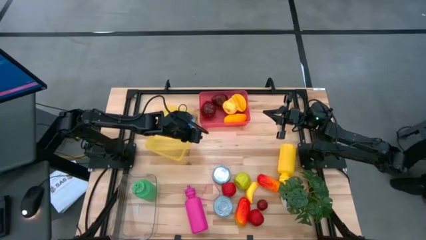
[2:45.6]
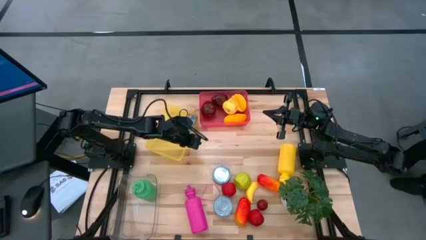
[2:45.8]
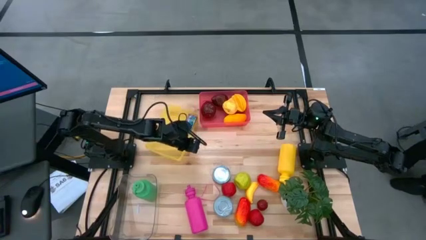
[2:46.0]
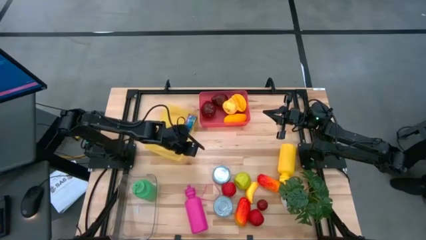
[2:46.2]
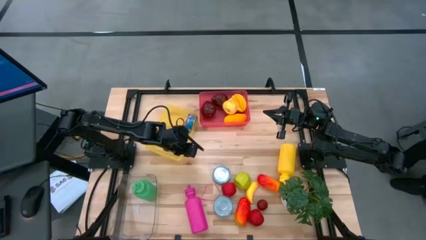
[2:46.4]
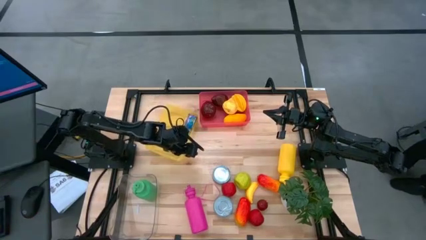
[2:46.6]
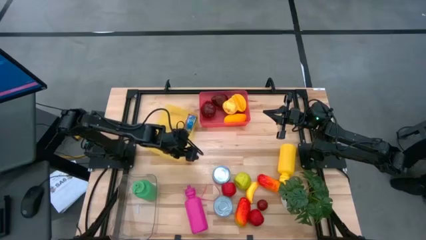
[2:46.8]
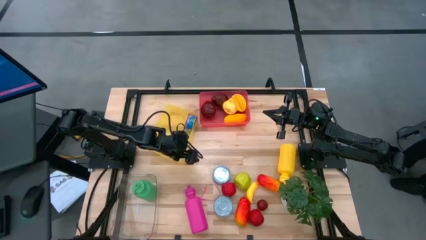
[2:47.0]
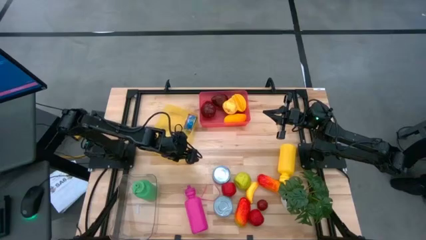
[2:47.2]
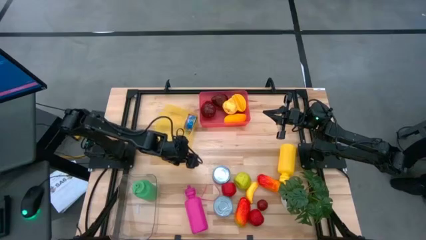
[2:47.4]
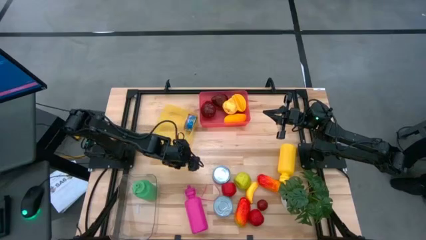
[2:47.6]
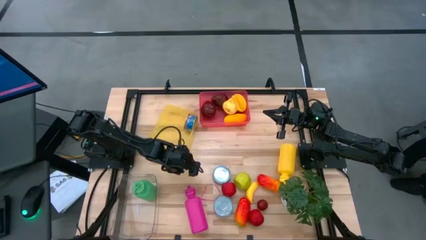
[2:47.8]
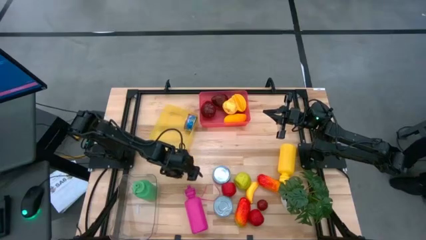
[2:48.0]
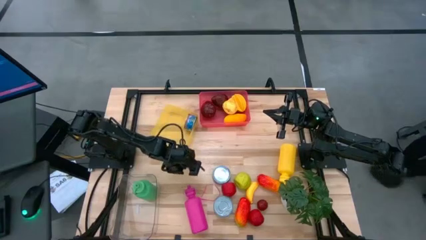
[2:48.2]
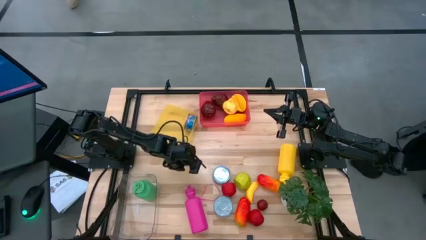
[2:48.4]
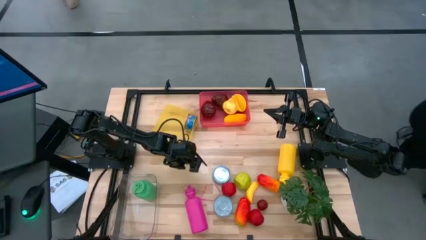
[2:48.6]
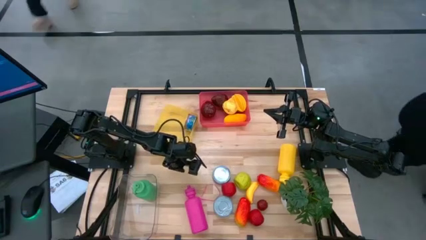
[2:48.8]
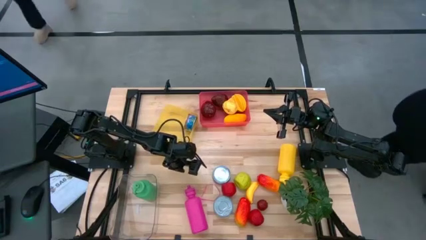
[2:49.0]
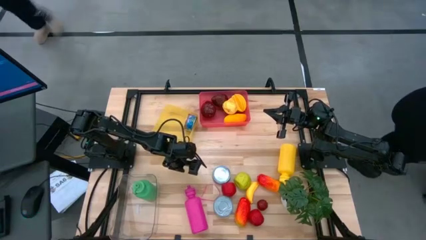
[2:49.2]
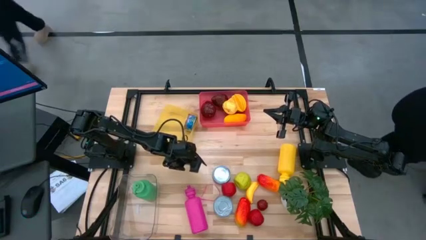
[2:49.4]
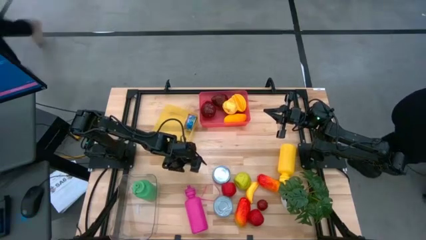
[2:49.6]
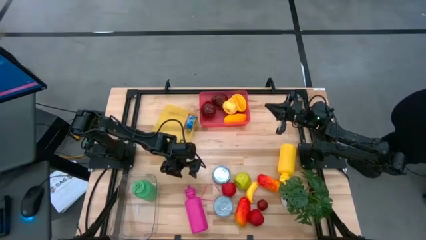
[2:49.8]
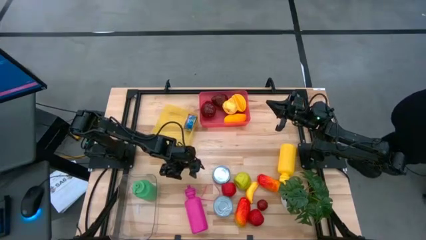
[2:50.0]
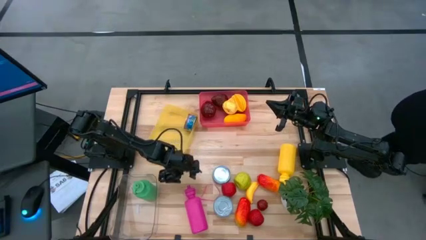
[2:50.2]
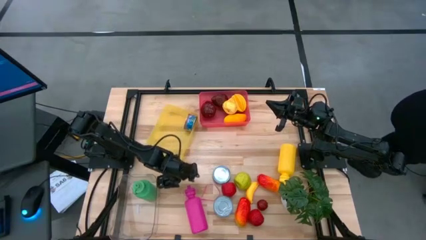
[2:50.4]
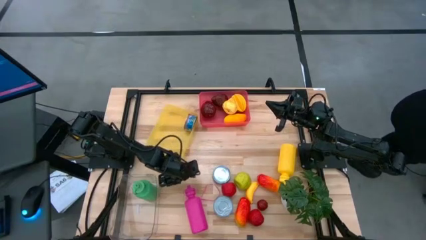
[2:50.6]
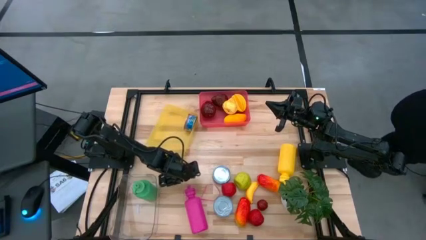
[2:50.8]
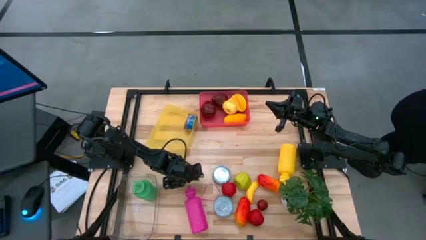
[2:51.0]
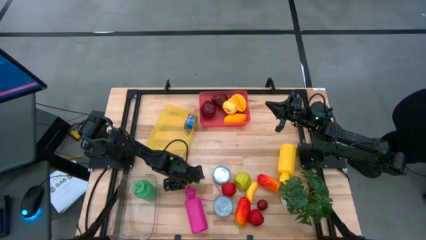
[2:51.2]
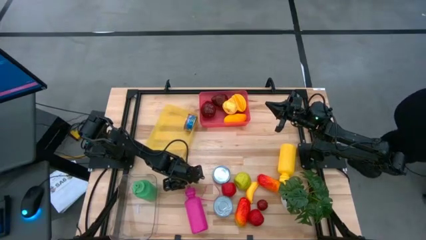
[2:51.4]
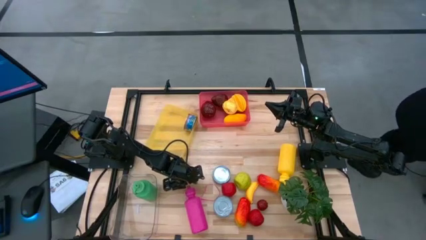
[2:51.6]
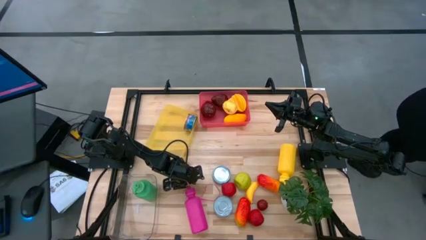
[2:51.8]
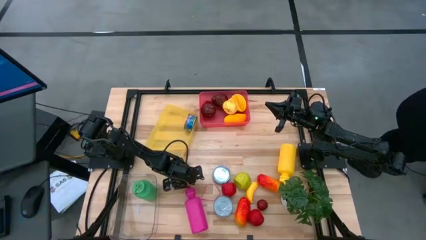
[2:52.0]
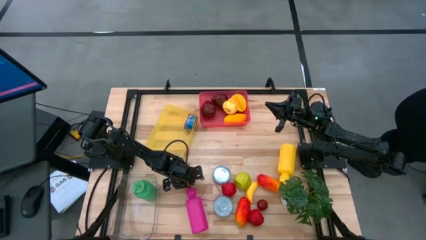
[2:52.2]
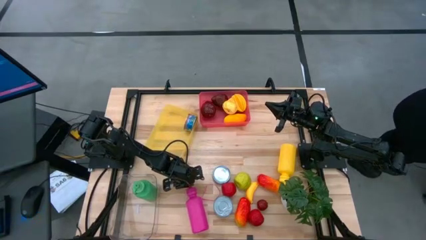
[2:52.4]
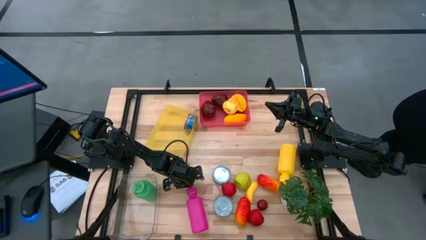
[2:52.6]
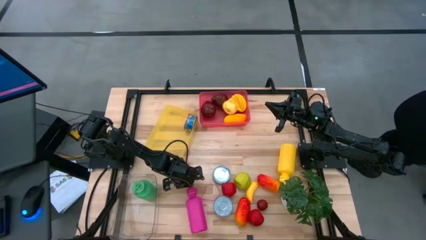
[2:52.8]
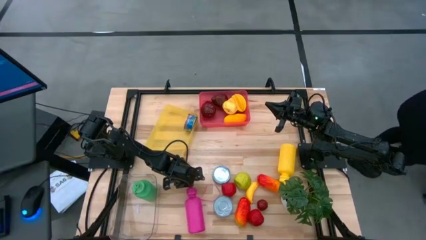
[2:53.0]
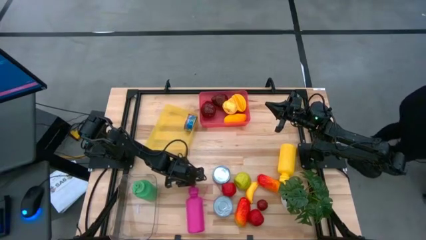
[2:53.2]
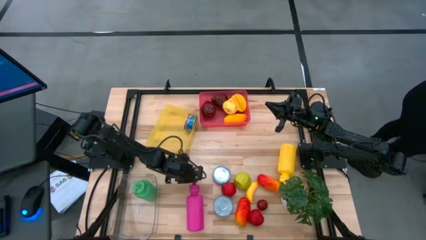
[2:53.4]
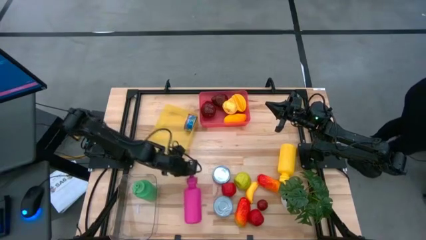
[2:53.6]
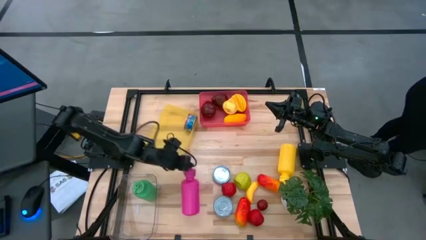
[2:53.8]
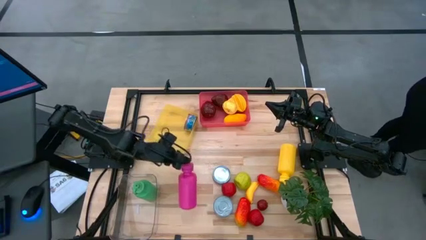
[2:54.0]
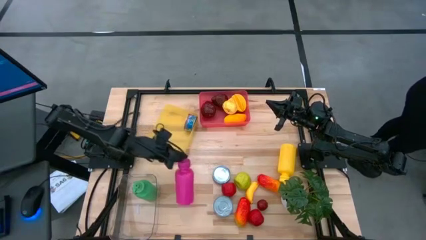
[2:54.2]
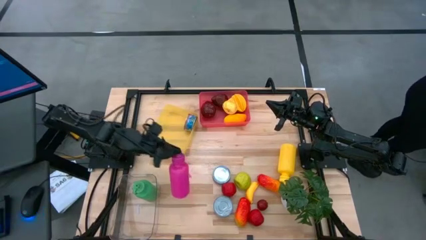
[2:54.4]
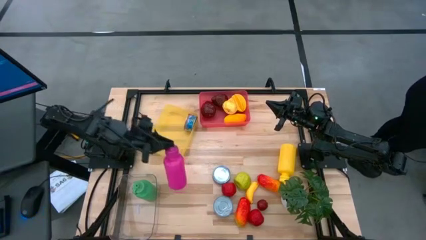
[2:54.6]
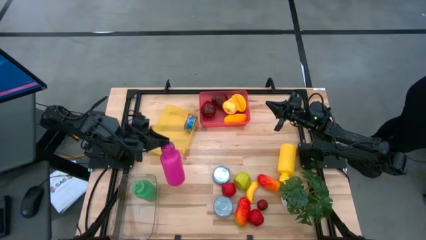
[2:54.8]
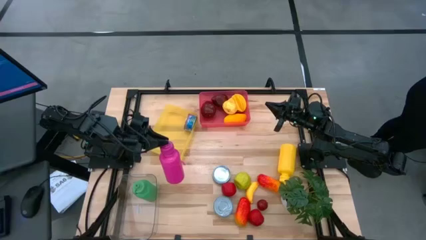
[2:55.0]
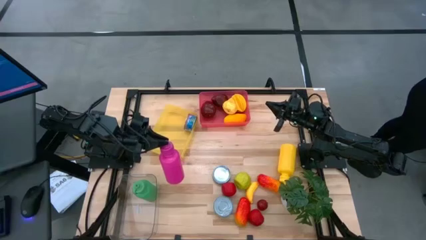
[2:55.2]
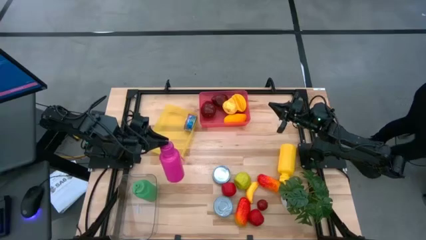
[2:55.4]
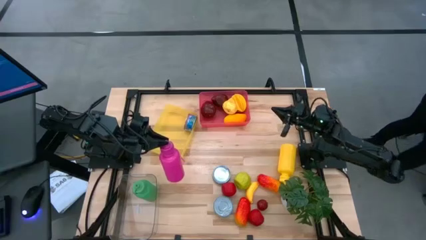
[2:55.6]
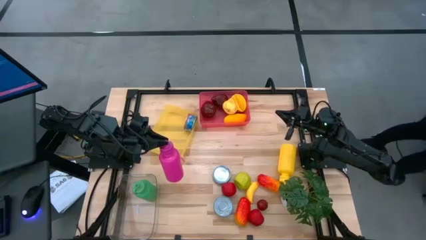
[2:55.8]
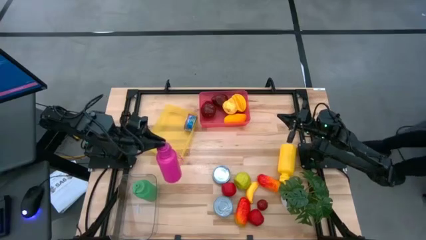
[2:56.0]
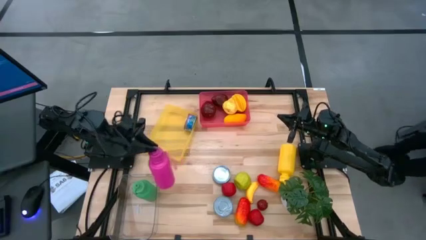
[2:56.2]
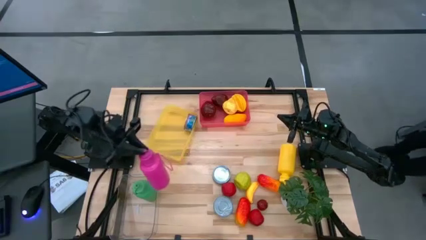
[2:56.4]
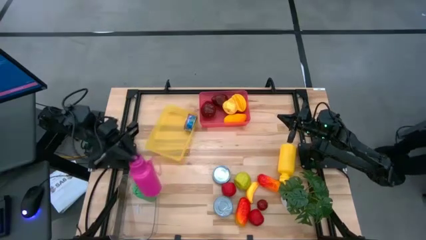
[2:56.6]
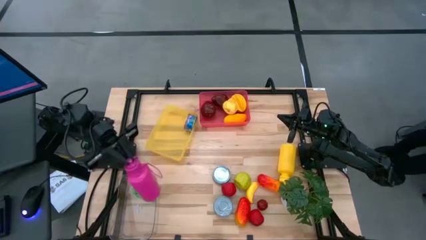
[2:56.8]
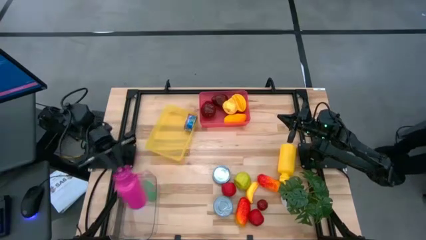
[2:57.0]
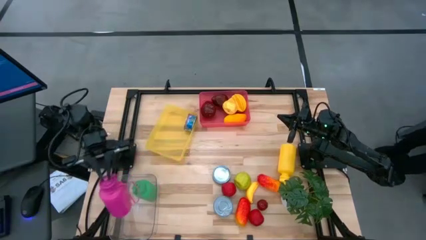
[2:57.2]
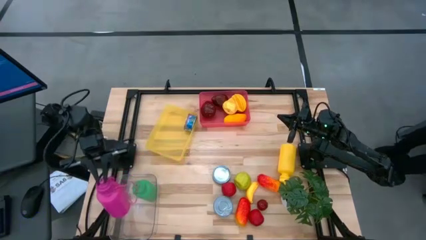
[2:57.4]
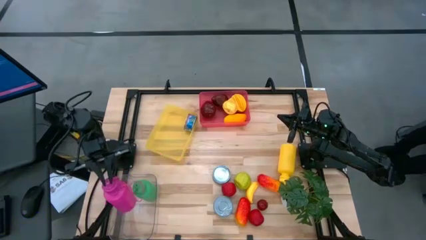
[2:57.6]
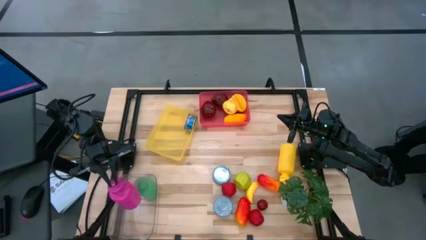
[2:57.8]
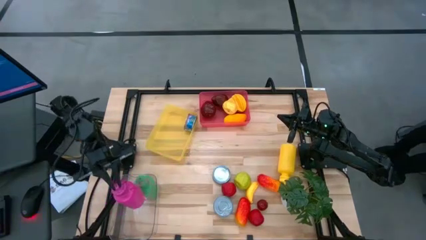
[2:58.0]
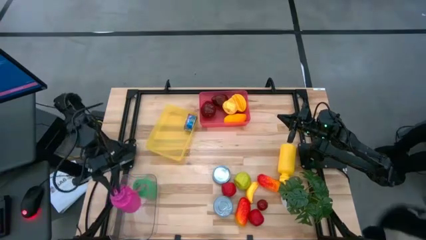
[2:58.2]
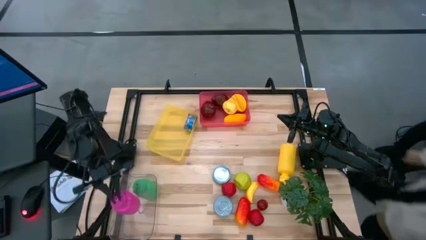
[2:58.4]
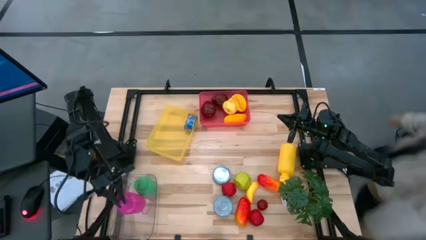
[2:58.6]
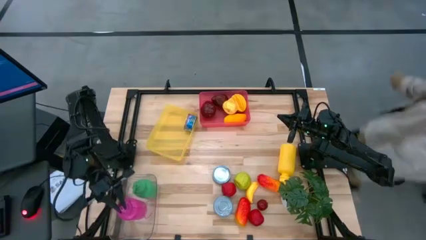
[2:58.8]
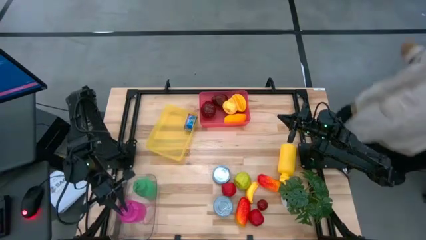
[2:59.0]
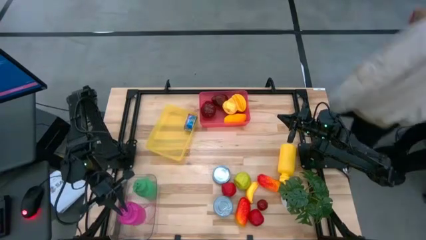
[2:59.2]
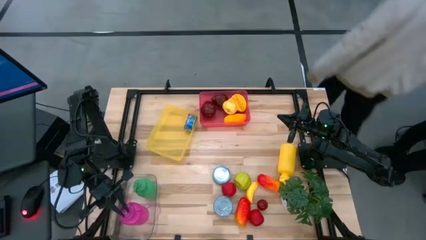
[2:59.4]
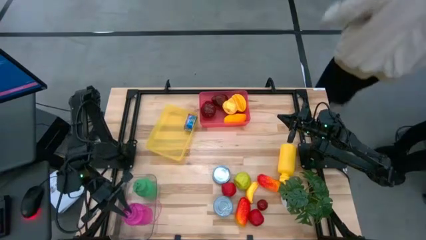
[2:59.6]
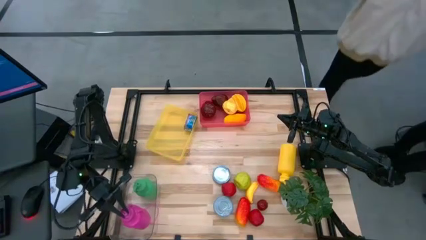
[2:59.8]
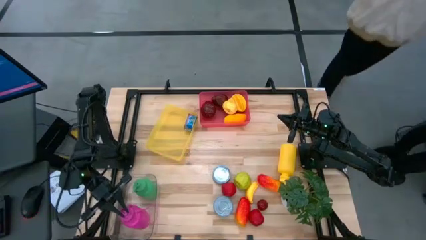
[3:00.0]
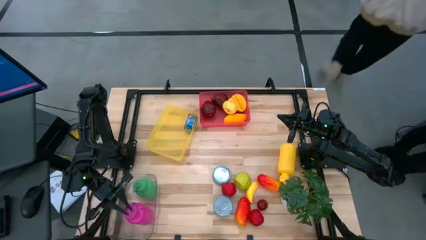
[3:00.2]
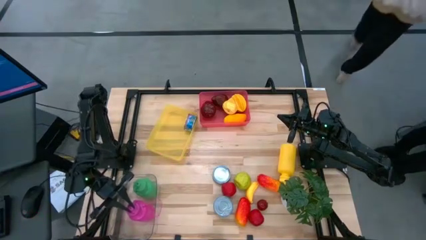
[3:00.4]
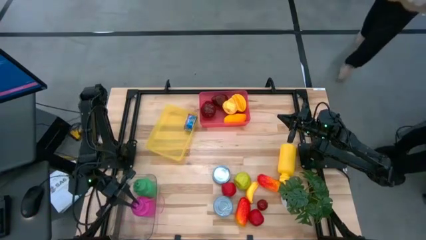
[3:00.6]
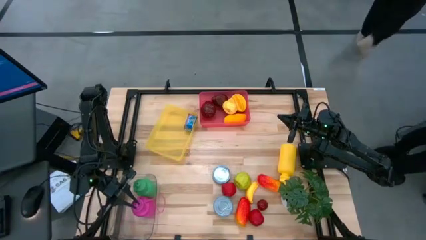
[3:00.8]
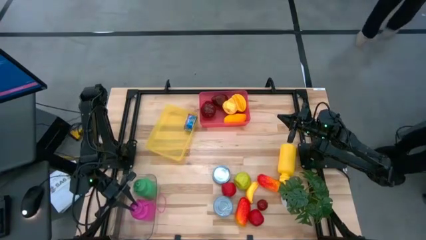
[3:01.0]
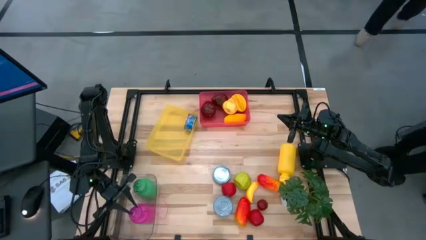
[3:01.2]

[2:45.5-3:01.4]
Task: Pick & Place Food Item
Put the pink water bottle into the transparent bin
